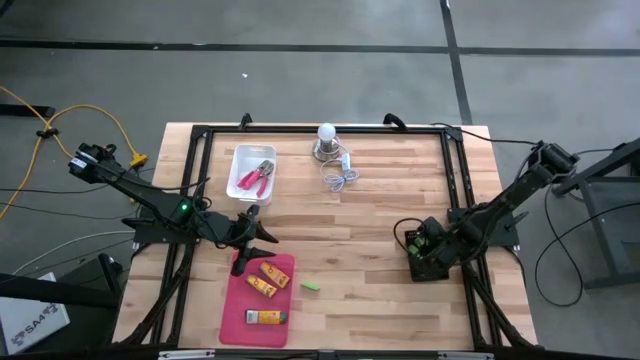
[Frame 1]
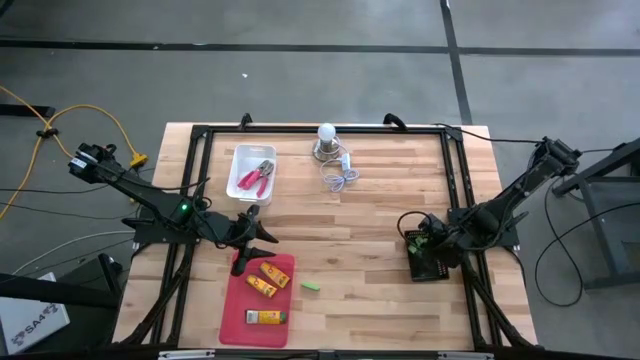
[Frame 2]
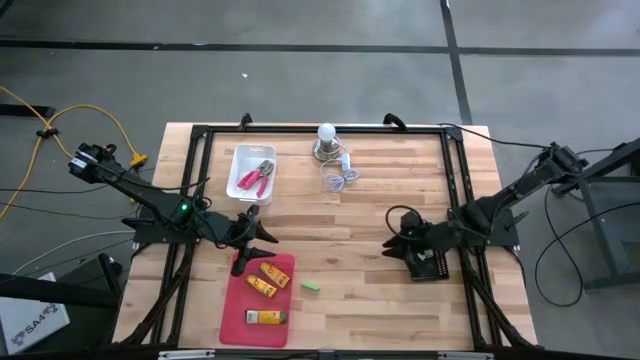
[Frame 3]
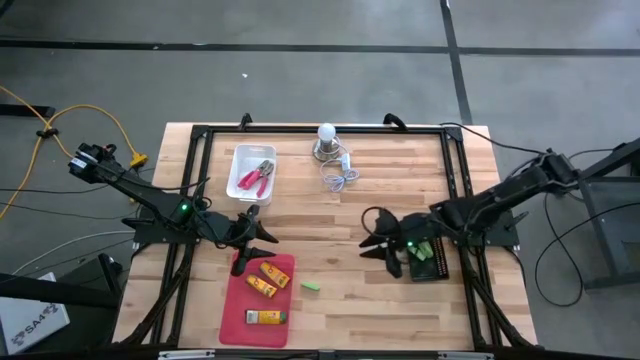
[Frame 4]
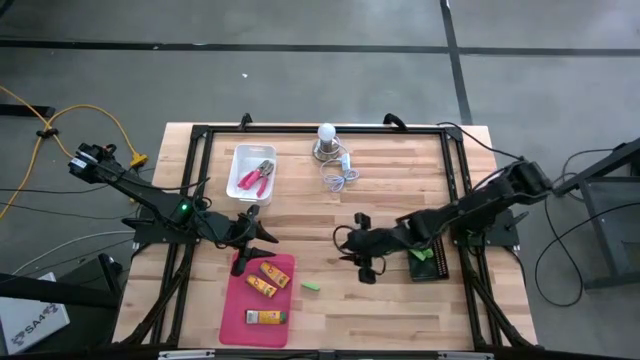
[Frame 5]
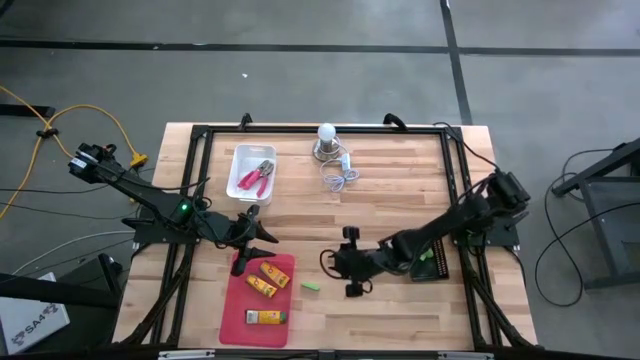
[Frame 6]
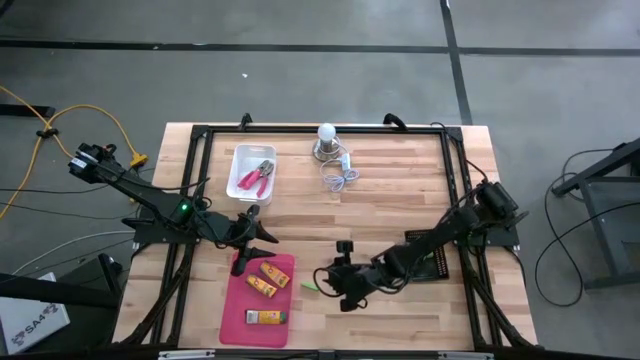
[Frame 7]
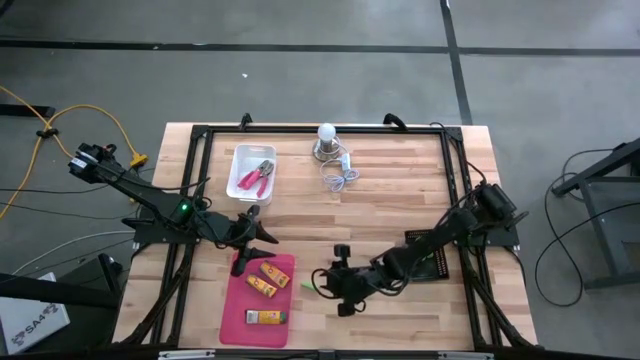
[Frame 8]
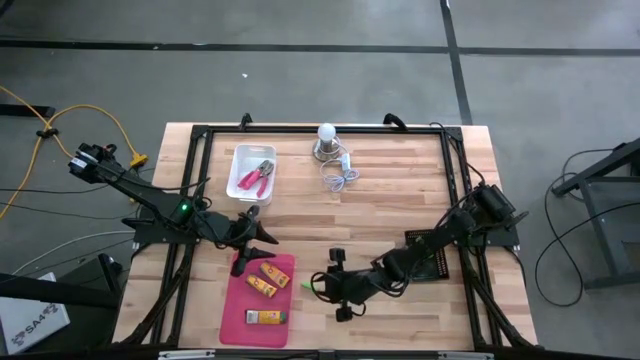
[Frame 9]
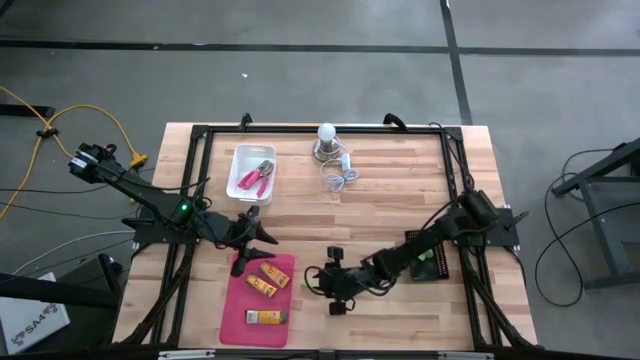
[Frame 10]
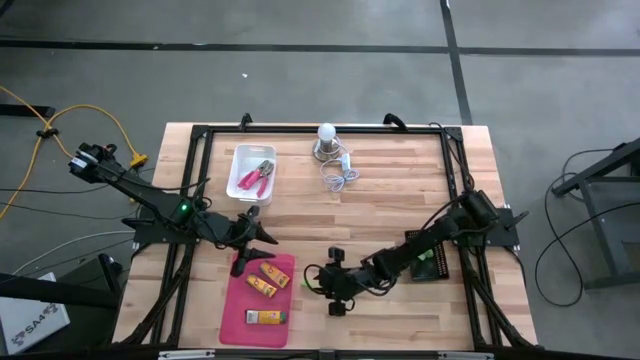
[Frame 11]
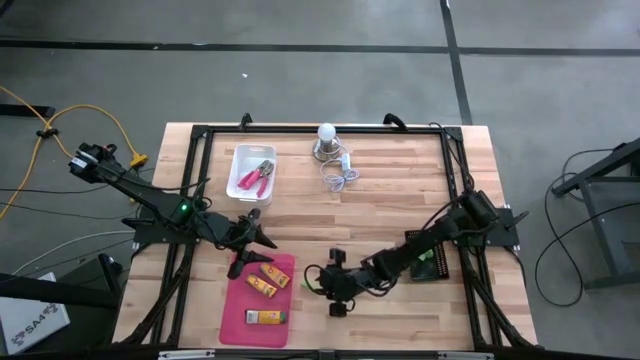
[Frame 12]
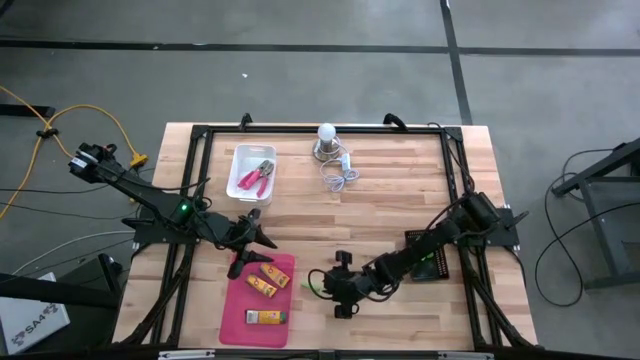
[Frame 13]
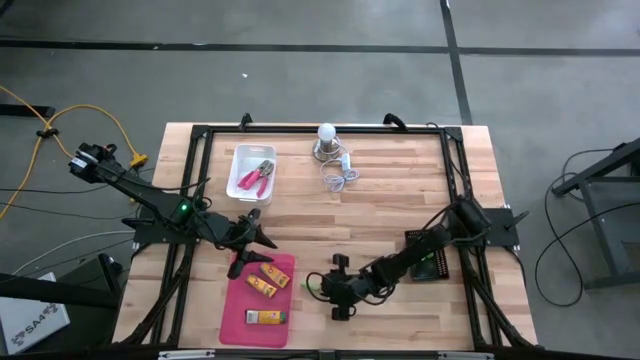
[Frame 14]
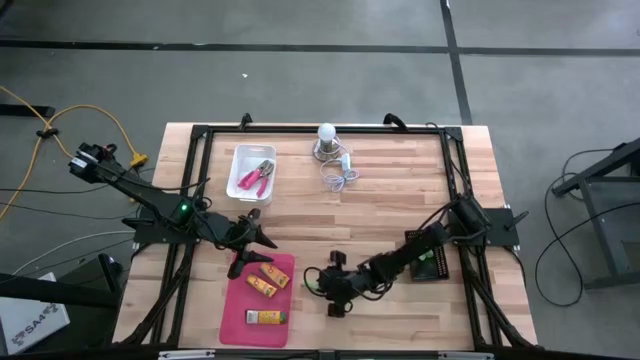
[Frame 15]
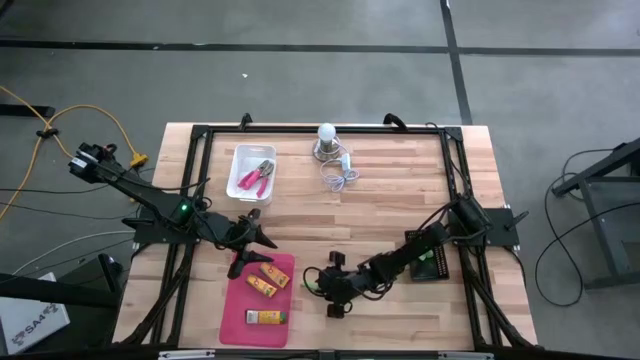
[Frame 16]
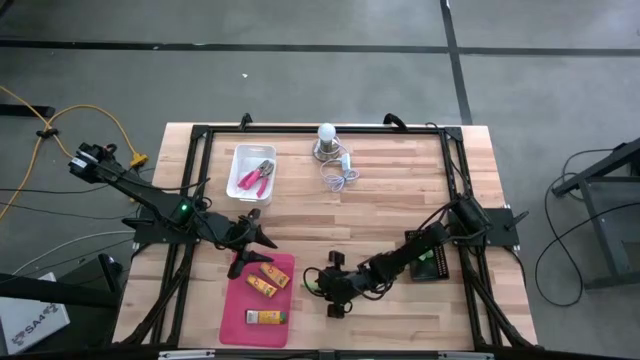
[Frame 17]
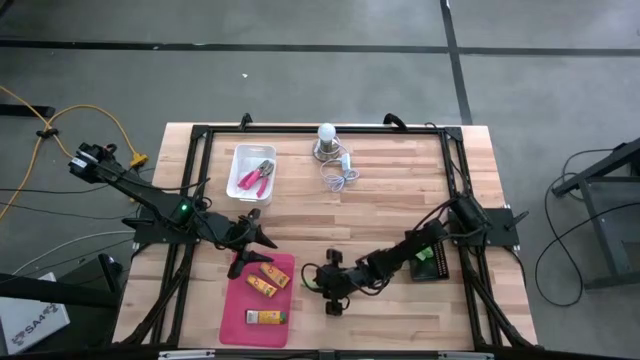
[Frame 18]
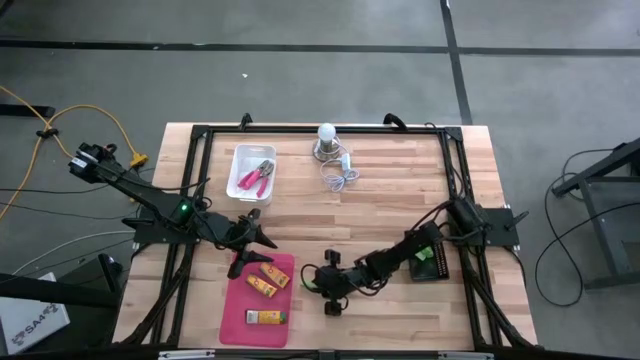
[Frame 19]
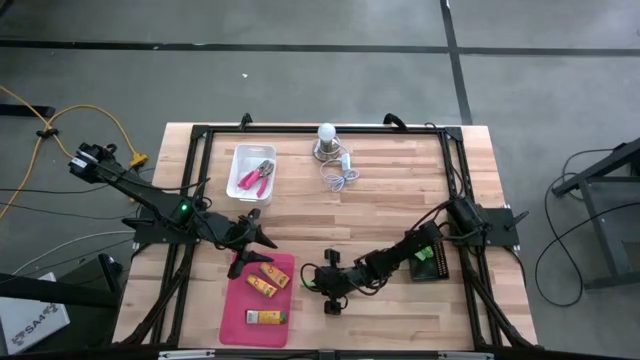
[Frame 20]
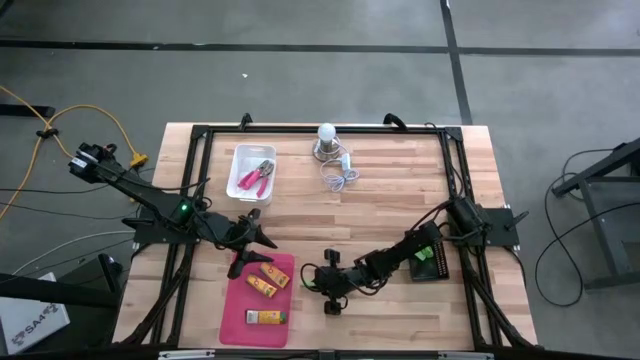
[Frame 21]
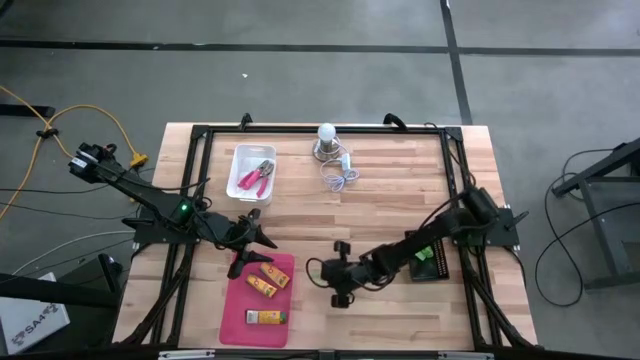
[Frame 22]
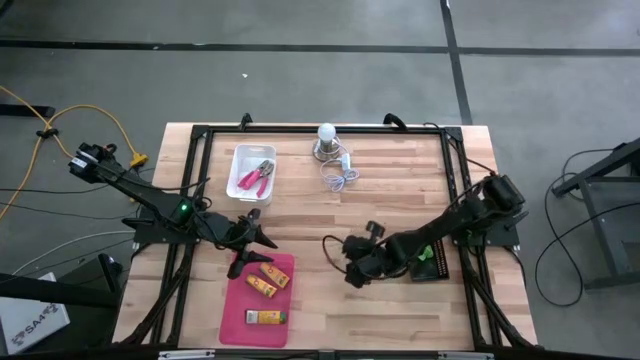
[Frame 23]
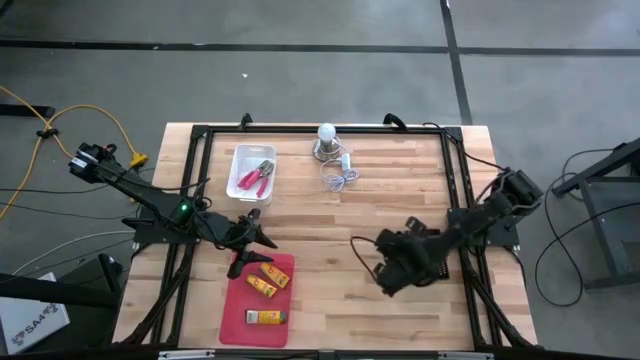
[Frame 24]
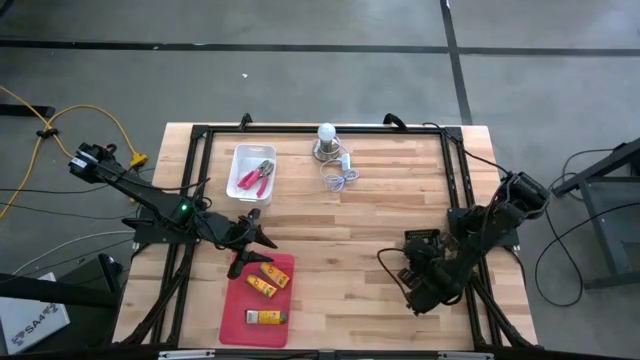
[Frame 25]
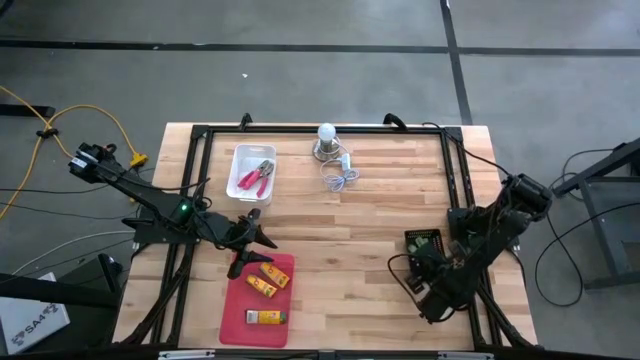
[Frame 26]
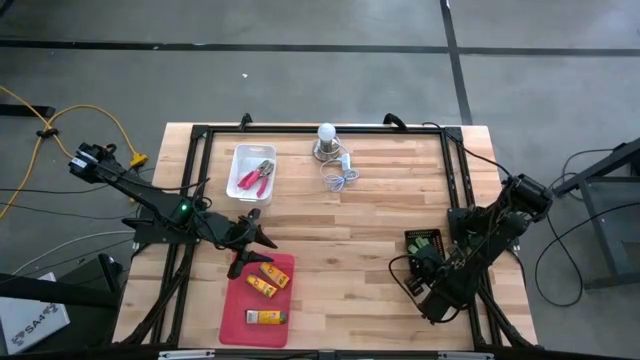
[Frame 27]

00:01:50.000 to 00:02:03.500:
Task: Pick & Place School Supplies
Put the green eraser into the black bin

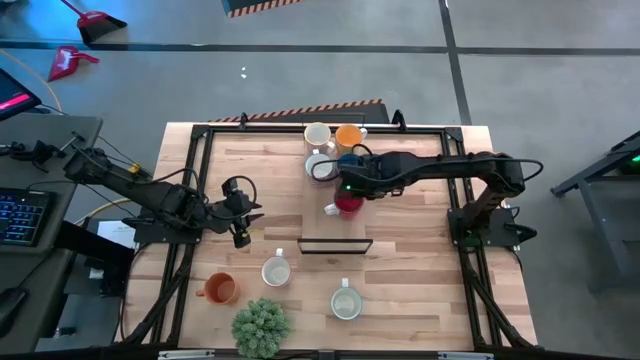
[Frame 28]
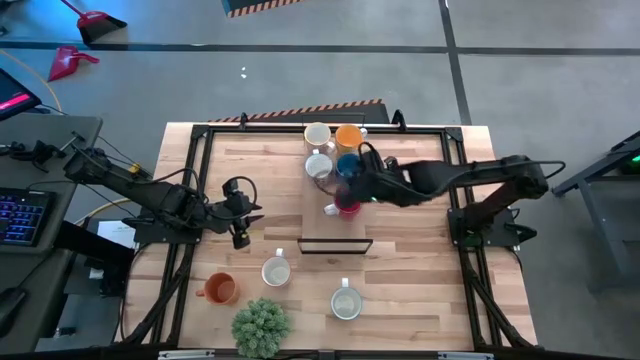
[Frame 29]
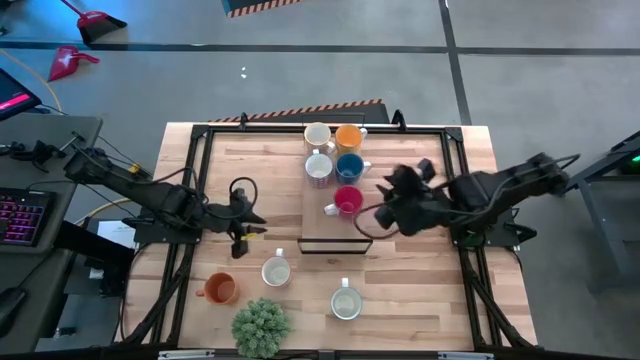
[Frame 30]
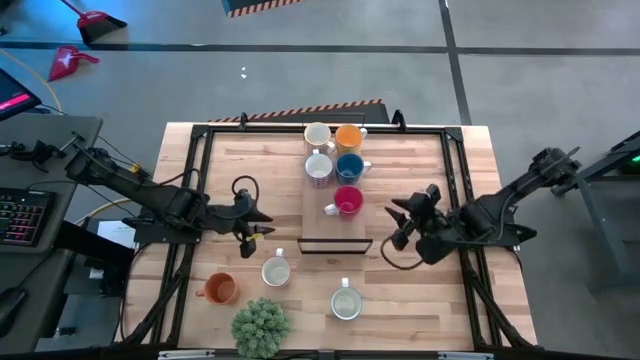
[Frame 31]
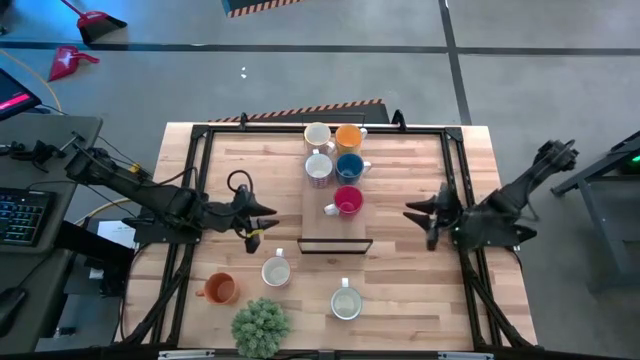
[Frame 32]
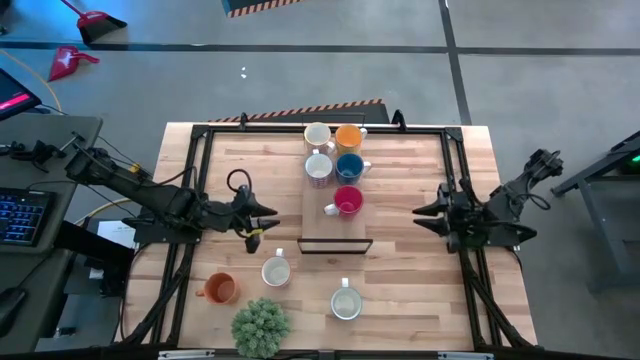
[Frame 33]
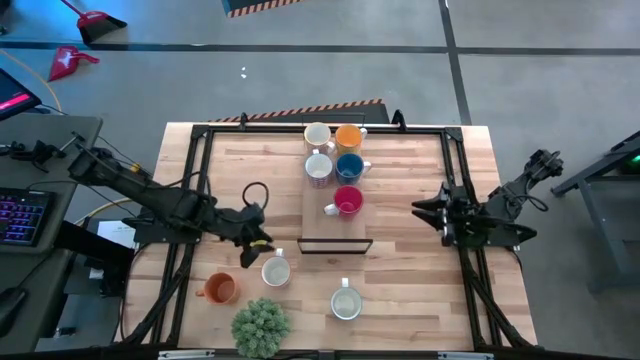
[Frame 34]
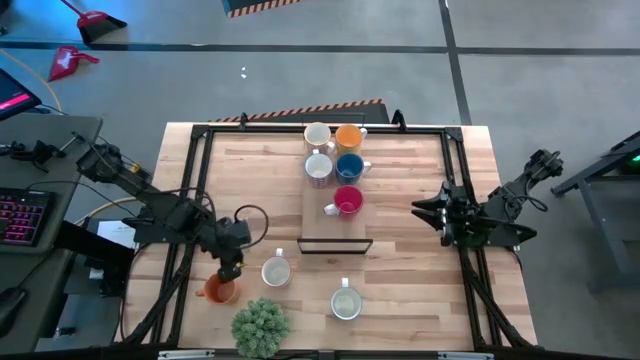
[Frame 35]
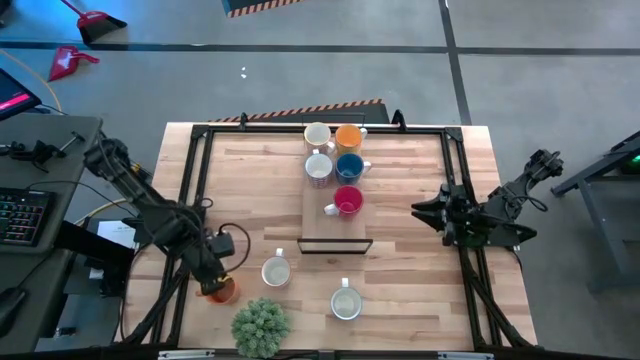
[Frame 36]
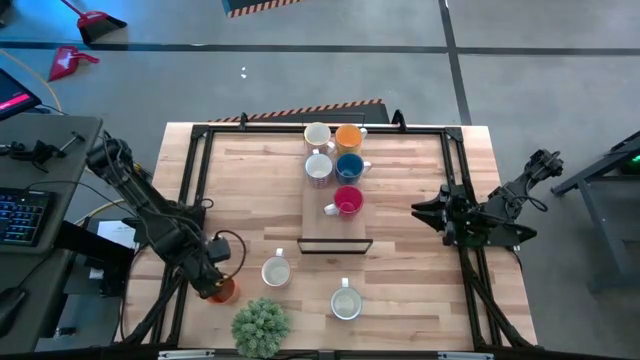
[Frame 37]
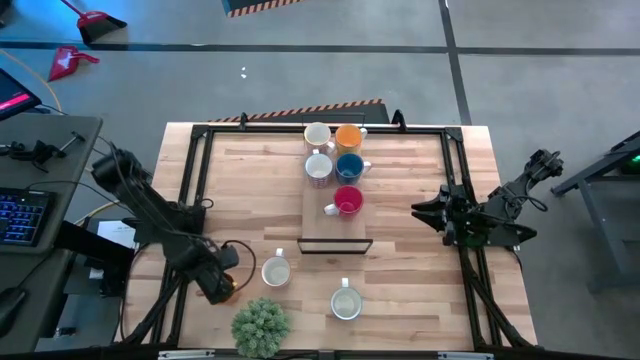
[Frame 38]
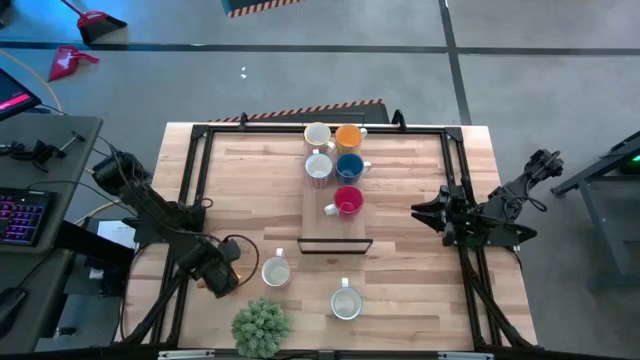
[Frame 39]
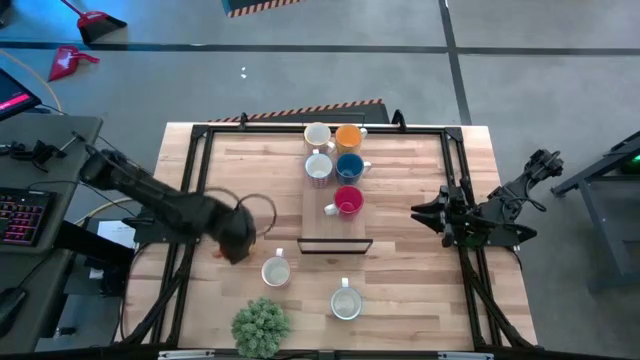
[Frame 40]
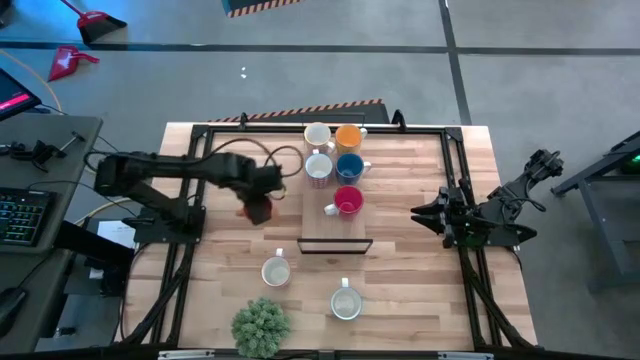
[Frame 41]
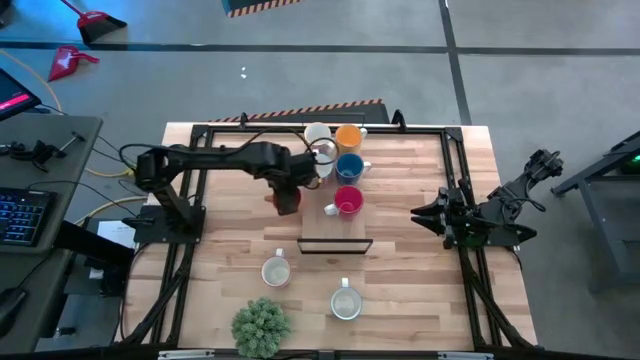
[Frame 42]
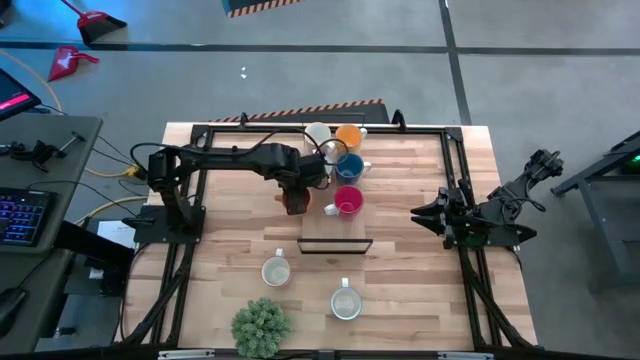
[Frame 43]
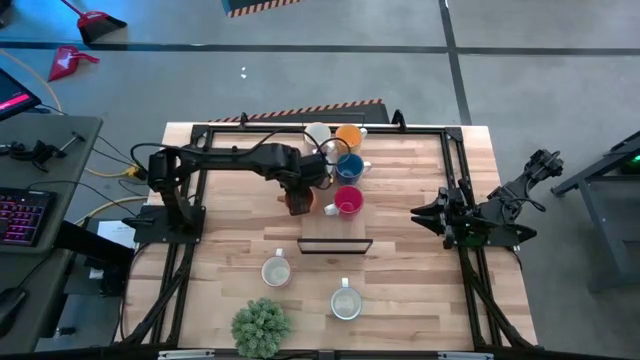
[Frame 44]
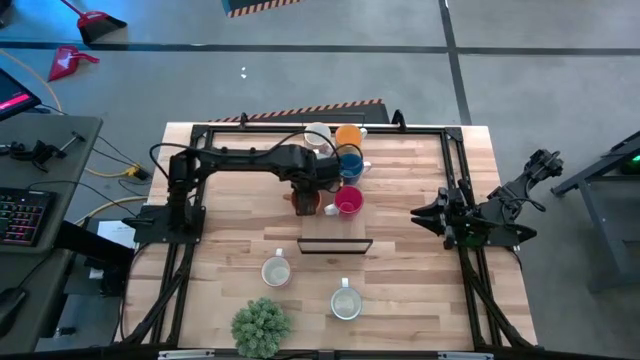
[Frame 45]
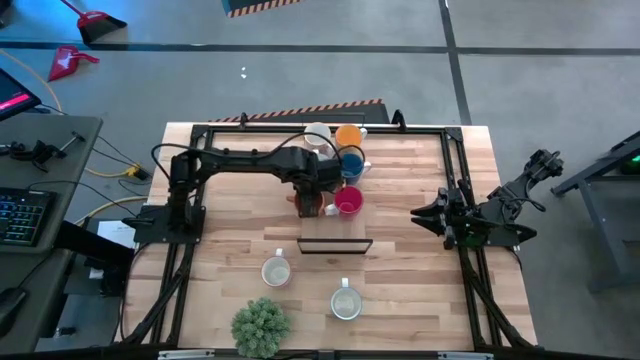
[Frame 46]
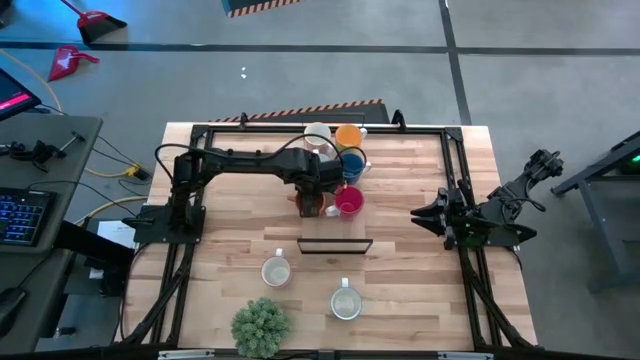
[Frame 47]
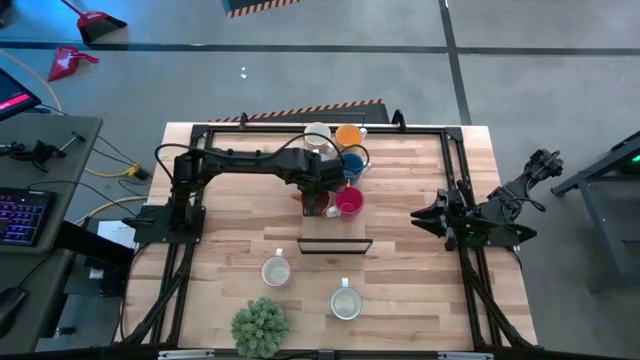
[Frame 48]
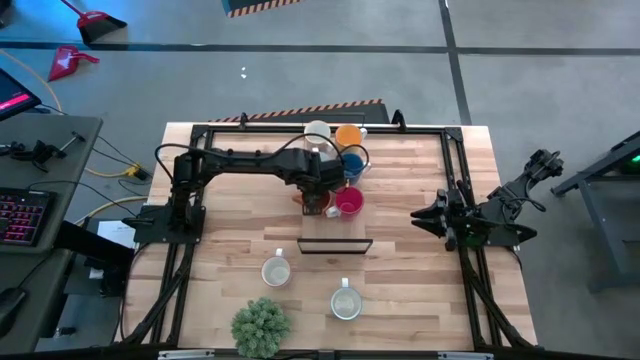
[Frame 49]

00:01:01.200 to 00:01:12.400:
Task: Place coffee mugs
Put the orange cup on the shelf aligned with the other red cup
